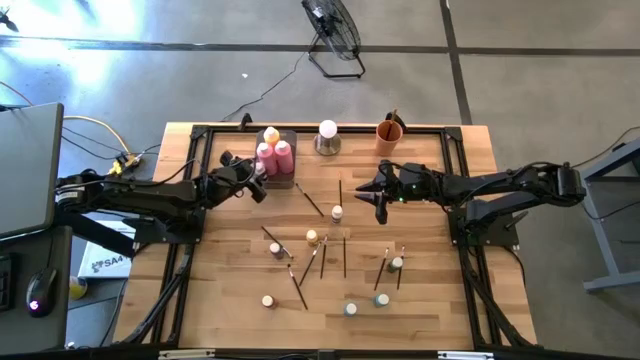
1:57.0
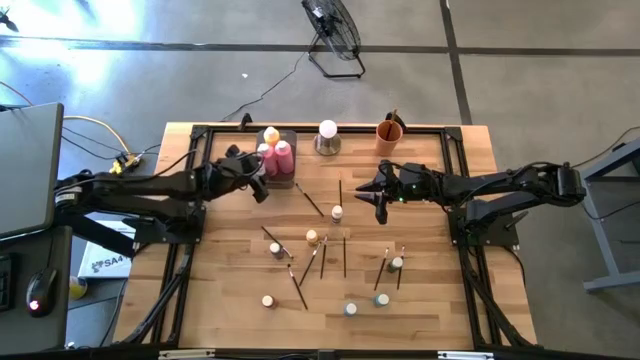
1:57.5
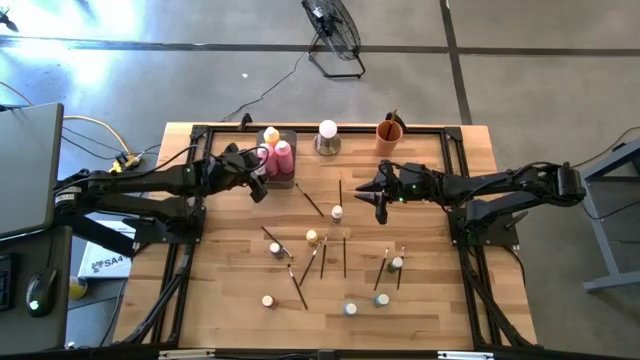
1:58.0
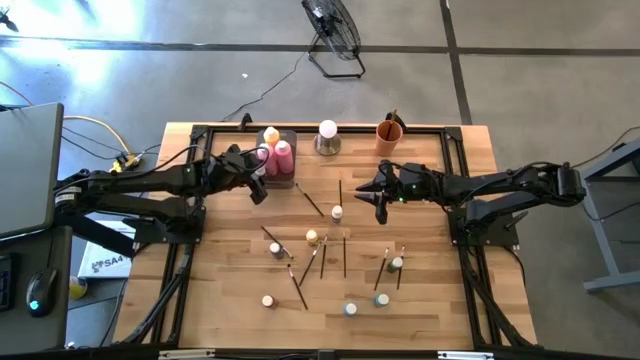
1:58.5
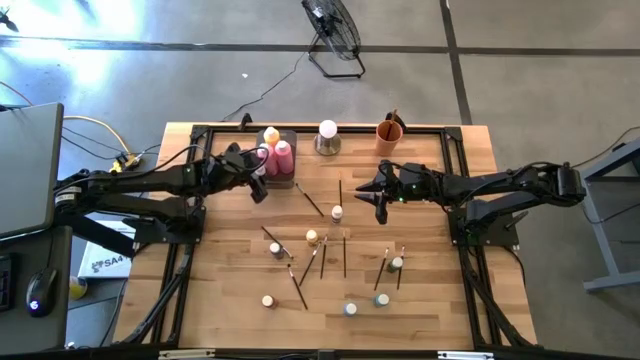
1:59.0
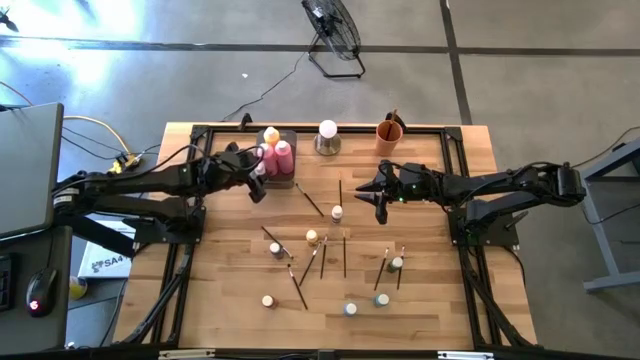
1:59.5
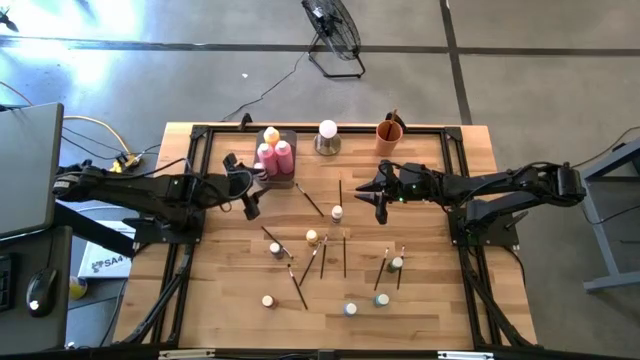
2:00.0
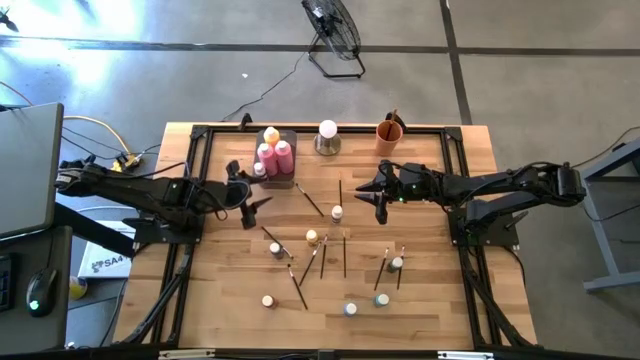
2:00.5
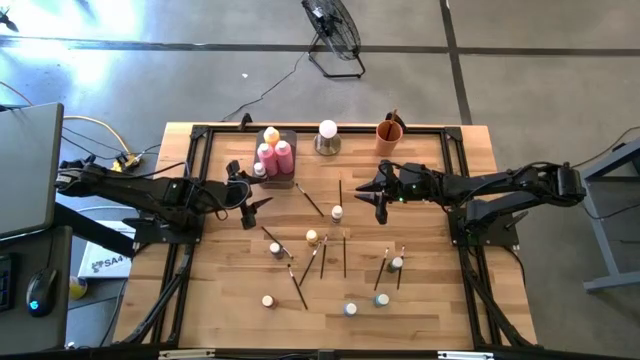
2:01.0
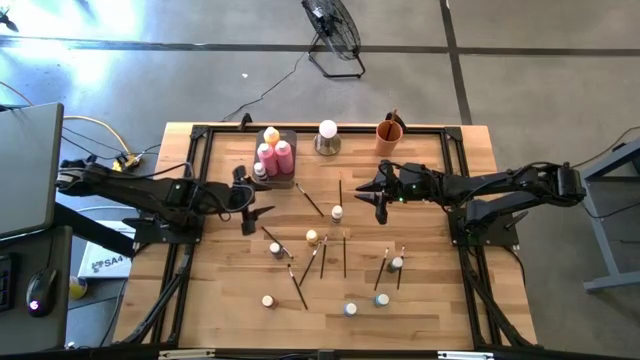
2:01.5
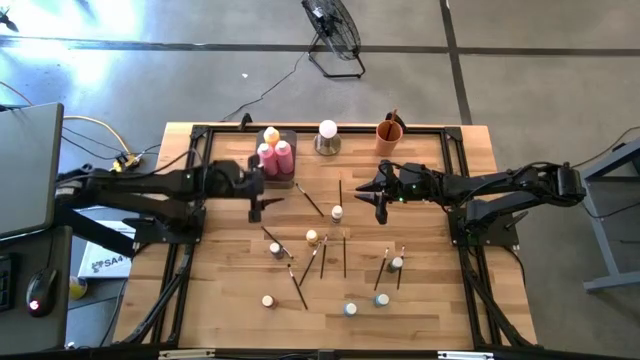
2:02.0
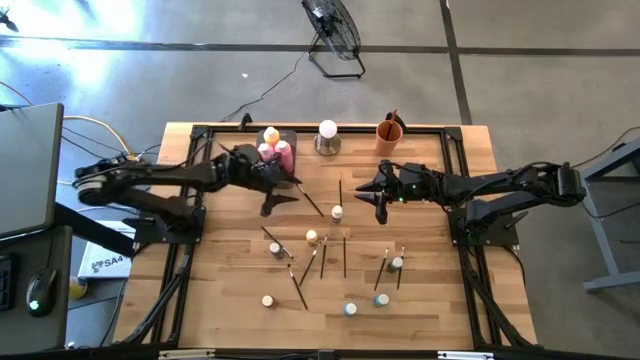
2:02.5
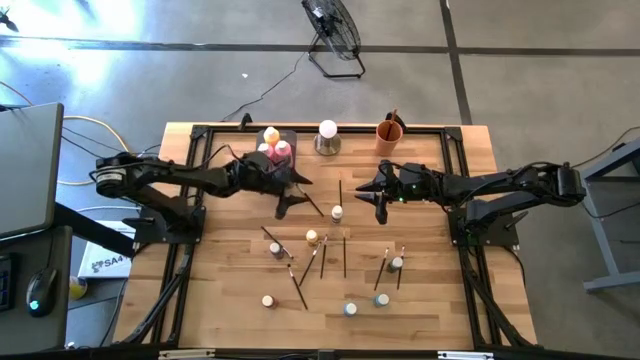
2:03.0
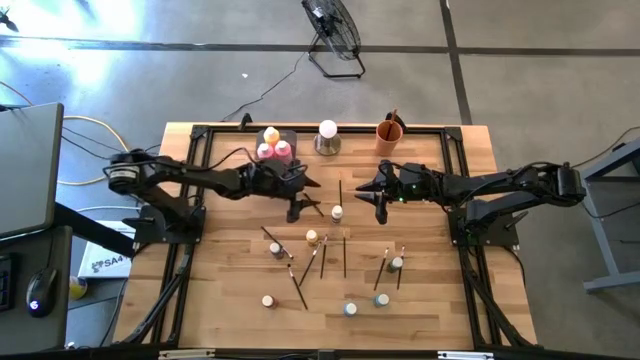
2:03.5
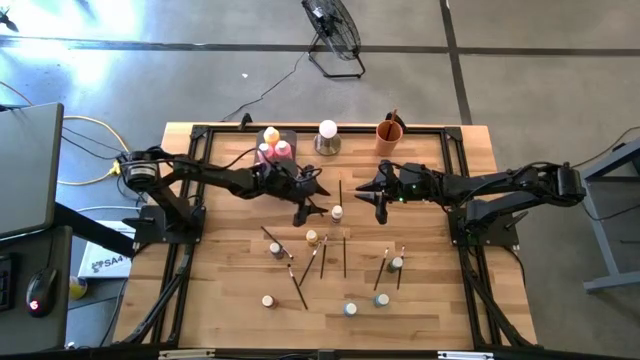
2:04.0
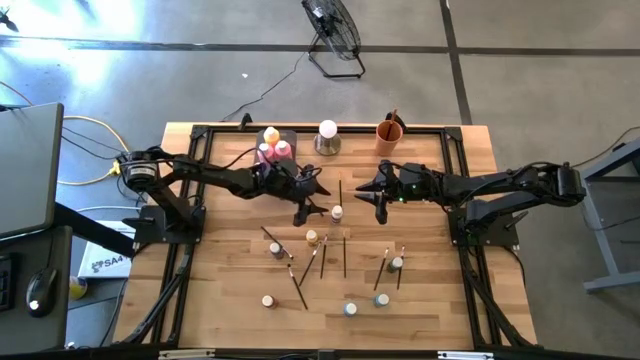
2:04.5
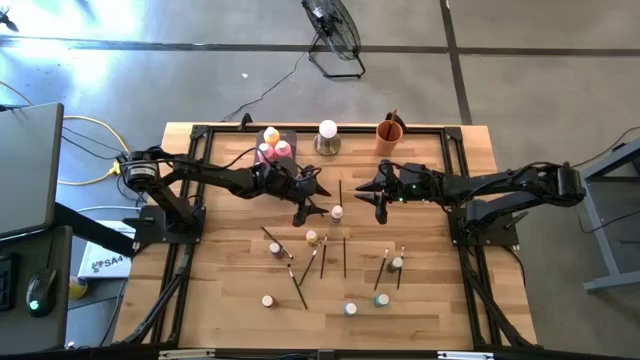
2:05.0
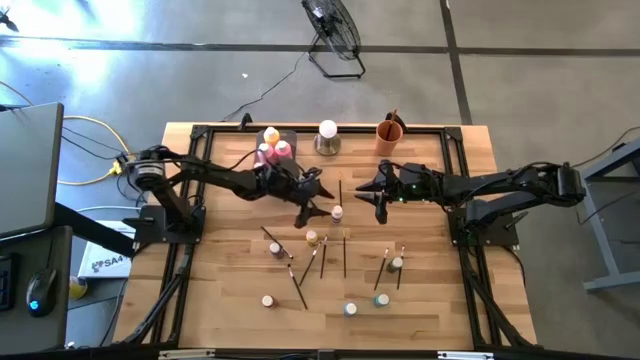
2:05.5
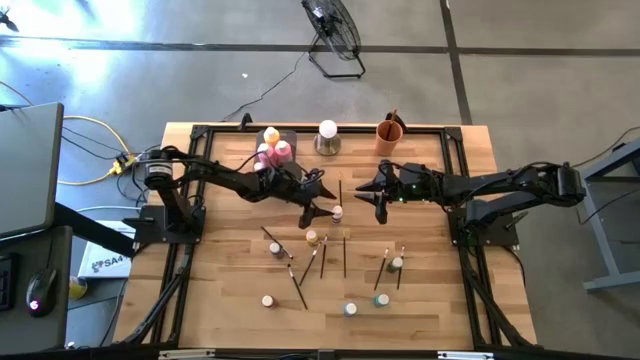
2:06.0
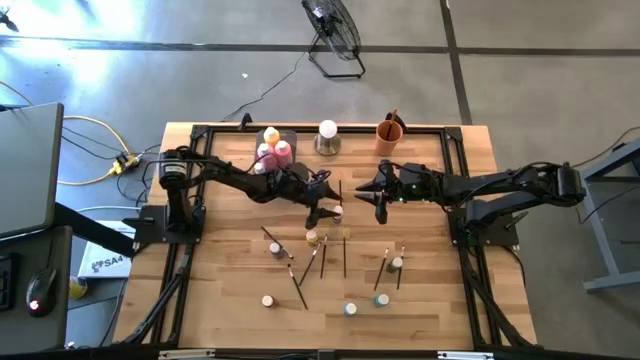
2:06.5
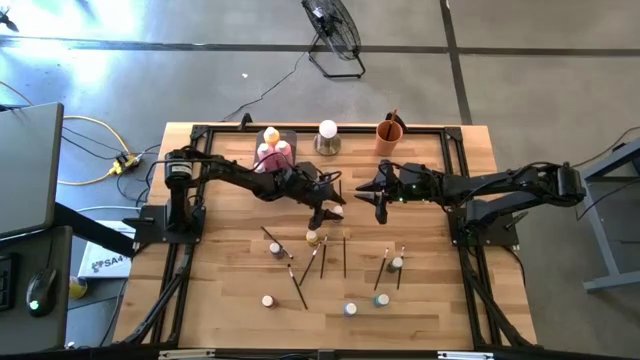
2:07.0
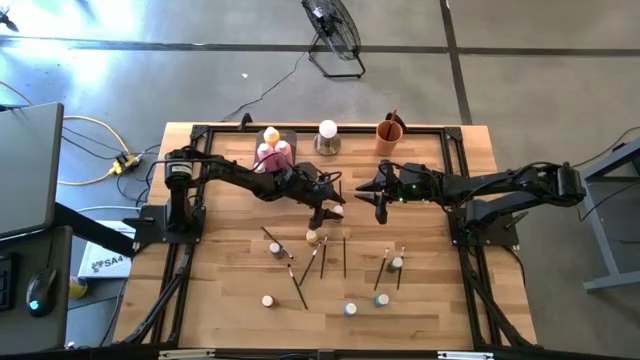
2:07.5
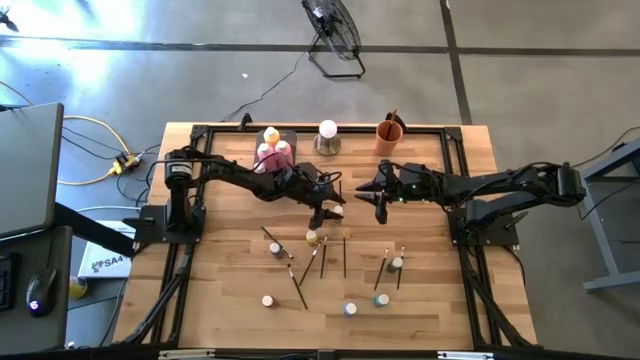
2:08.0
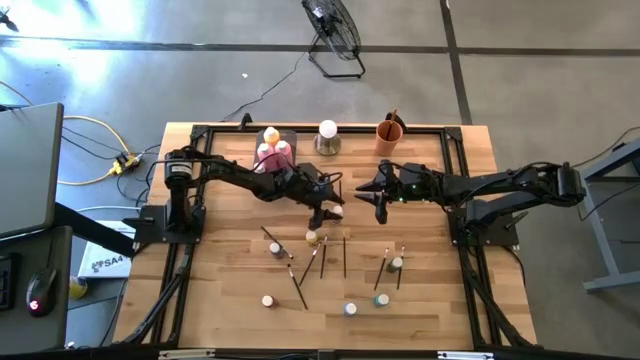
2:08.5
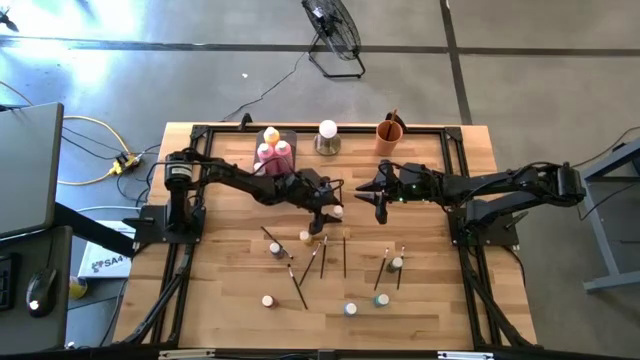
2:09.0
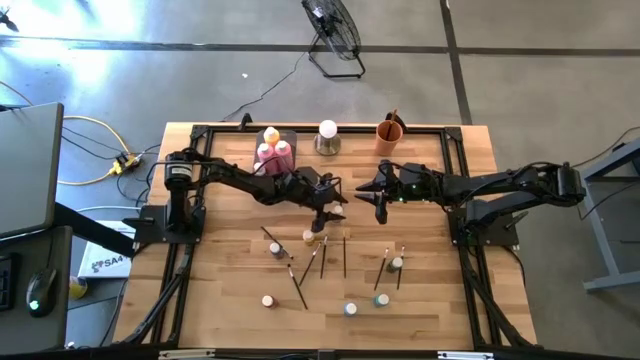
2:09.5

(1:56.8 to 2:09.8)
Task: Pick & Place Paint Supplies
Put the small white black paint bottle into the gray bin

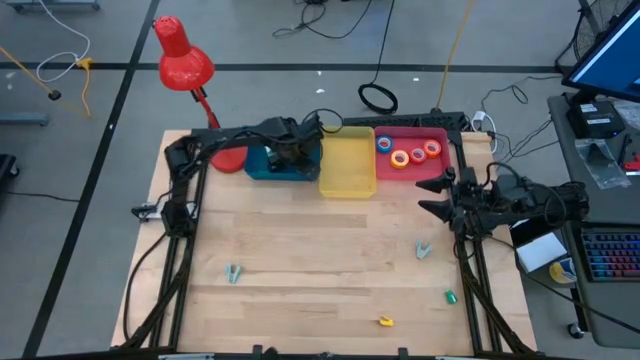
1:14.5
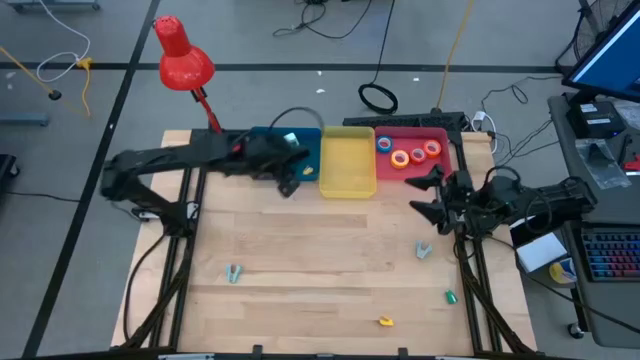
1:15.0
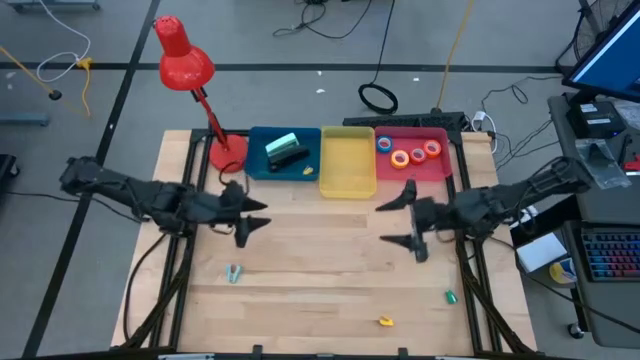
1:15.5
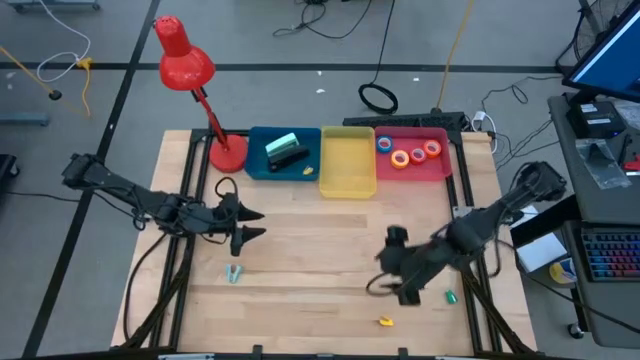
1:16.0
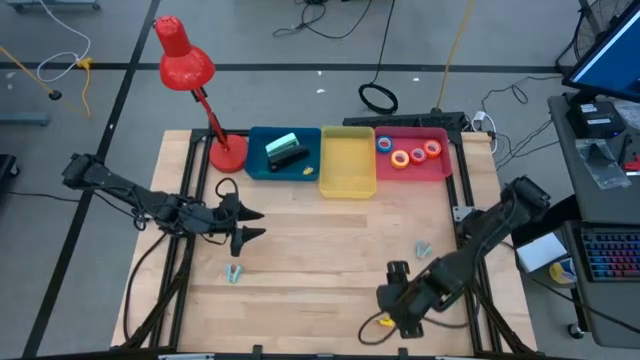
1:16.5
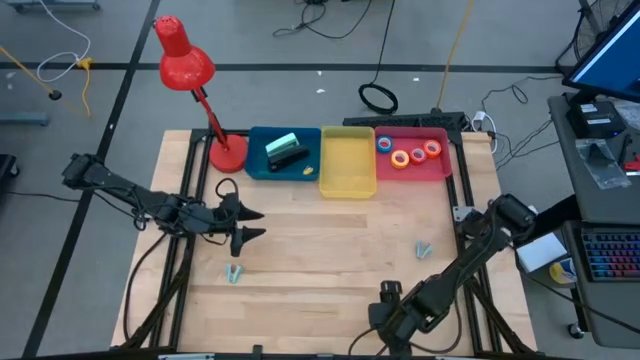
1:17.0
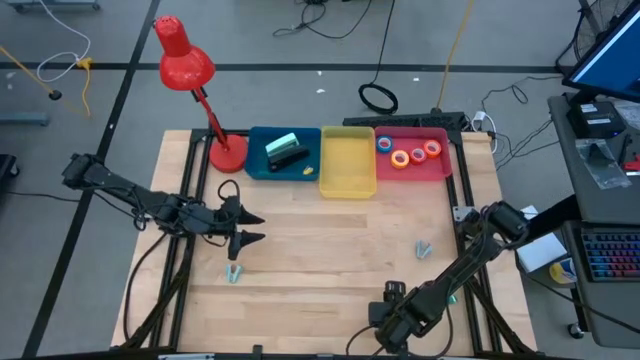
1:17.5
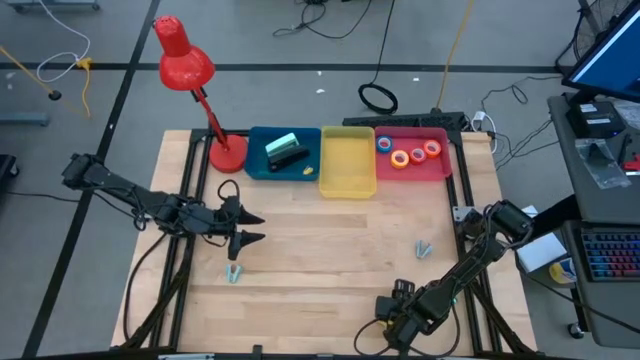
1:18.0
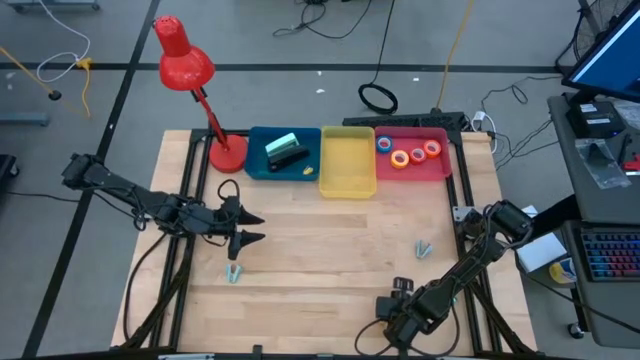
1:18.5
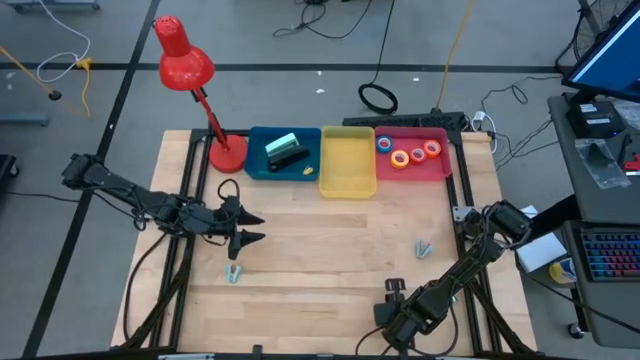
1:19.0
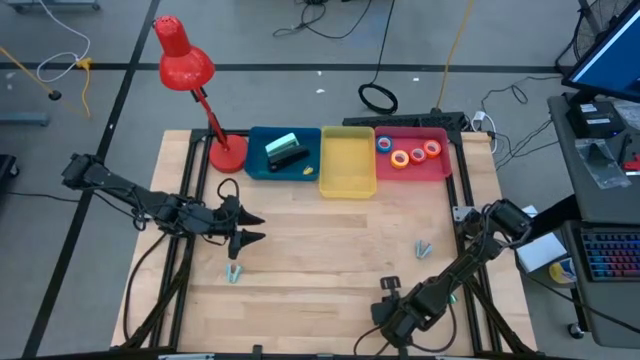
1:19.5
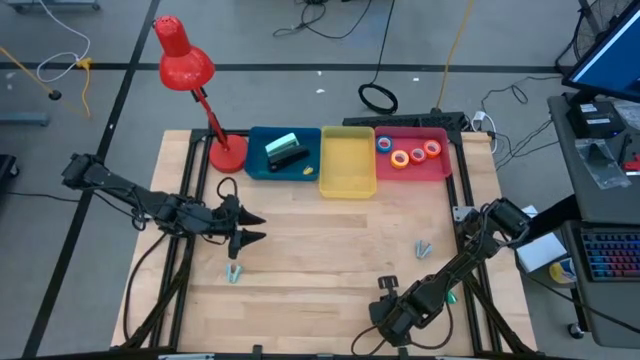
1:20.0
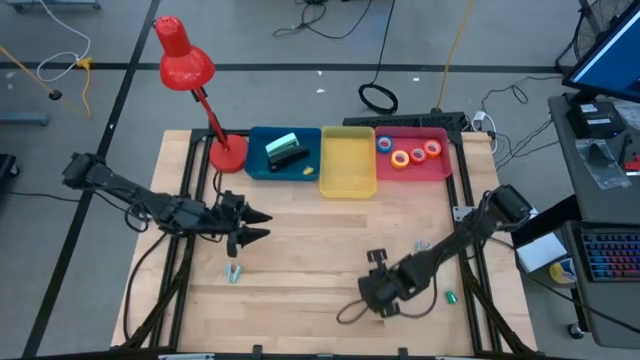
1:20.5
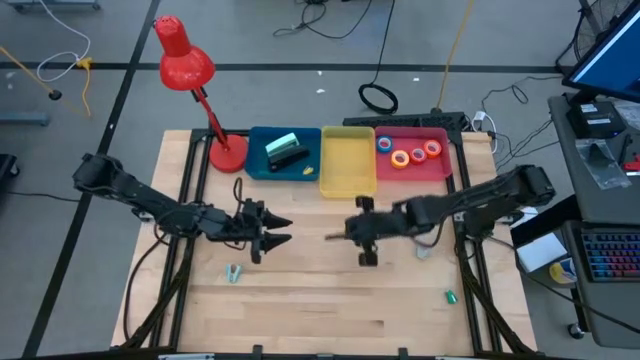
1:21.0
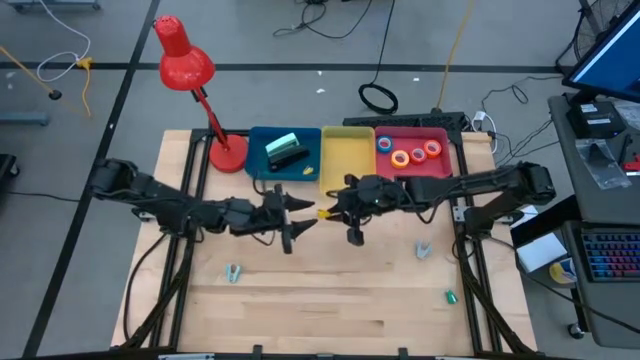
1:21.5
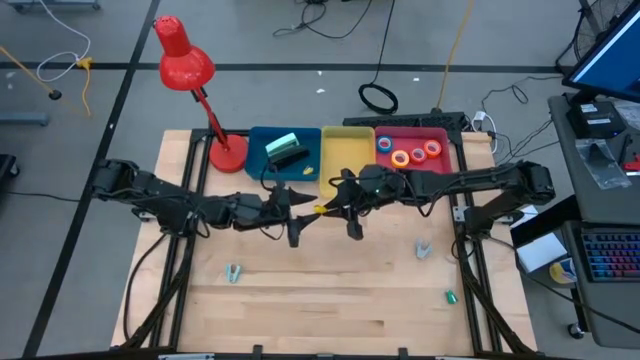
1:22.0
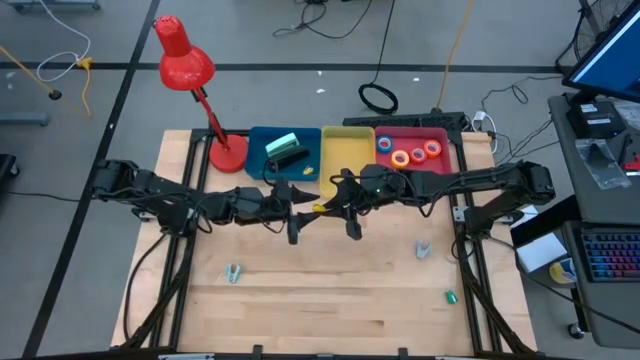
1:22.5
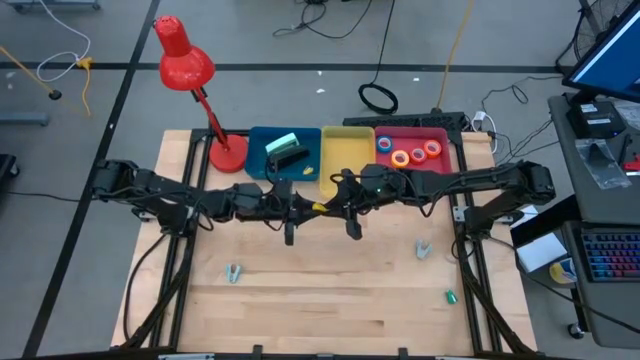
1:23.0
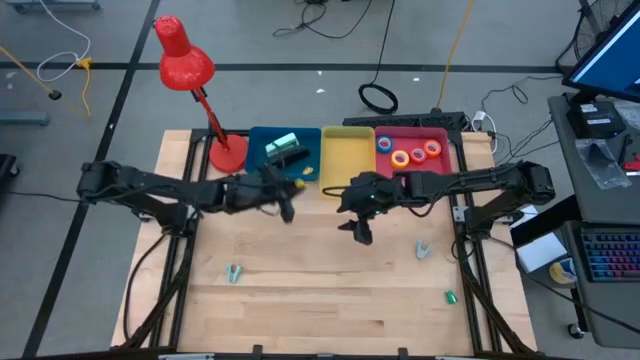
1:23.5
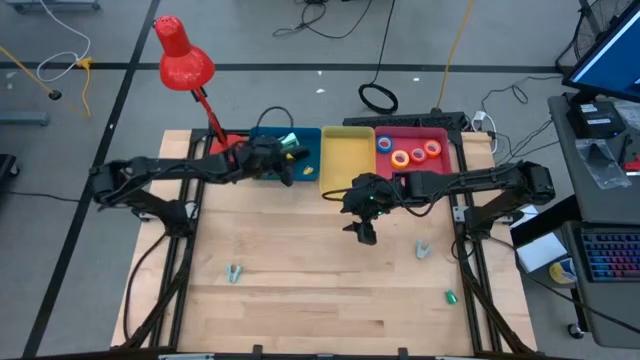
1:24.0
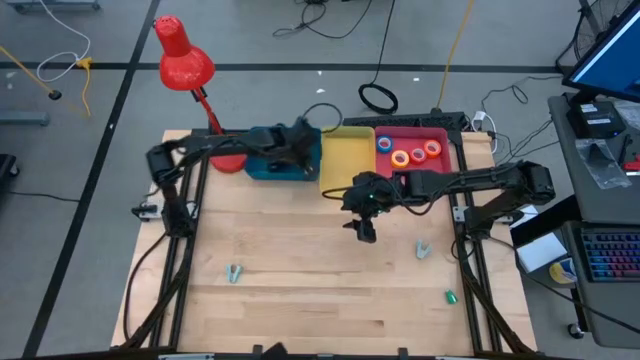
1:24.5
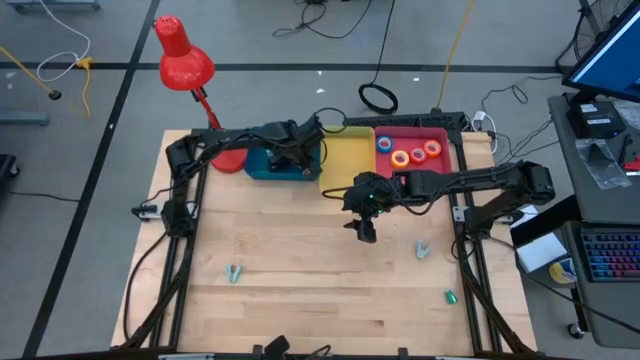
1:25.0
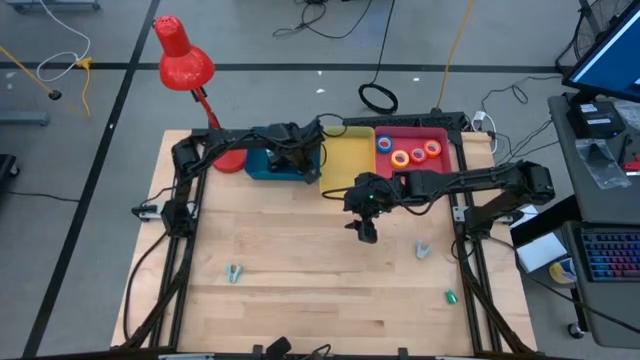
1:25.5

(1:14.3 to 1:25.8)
Task: Pick and place Stapler, Stapler remover, tape
Put the small yellow stapler into the blue bin
